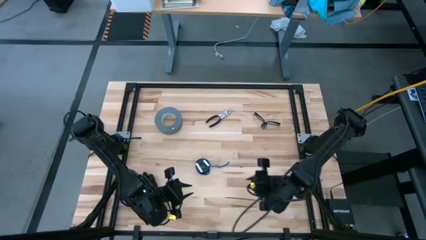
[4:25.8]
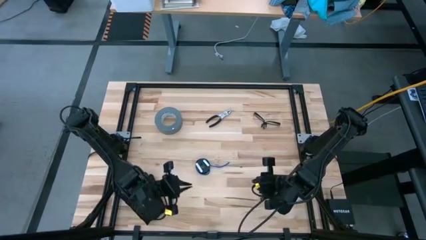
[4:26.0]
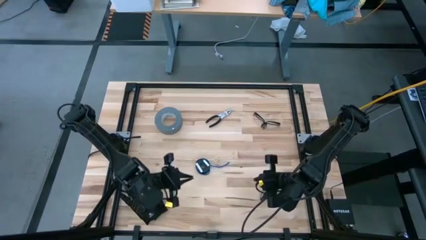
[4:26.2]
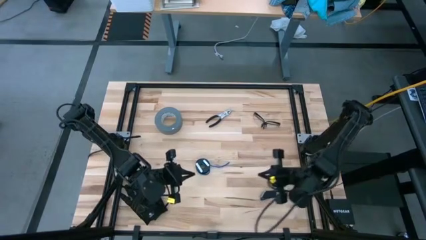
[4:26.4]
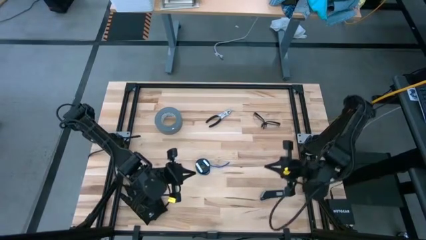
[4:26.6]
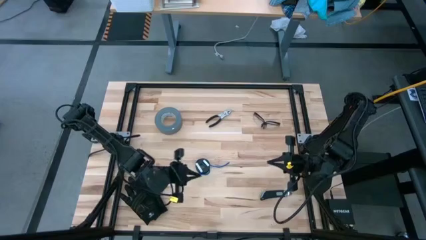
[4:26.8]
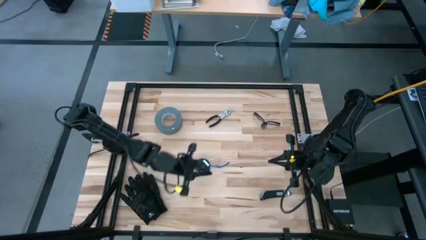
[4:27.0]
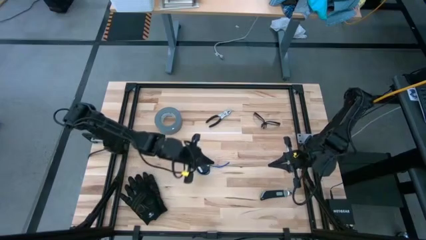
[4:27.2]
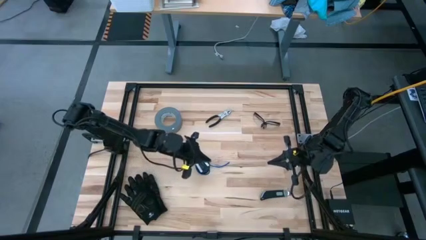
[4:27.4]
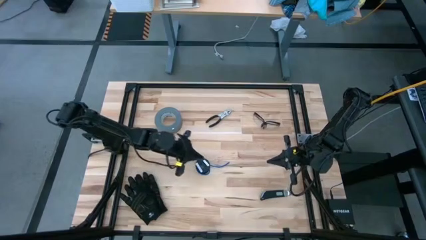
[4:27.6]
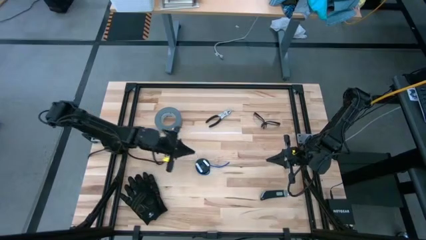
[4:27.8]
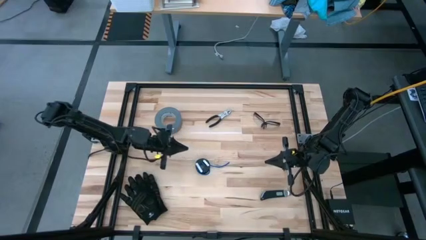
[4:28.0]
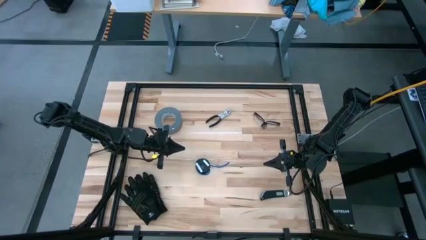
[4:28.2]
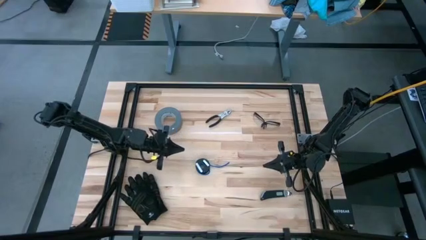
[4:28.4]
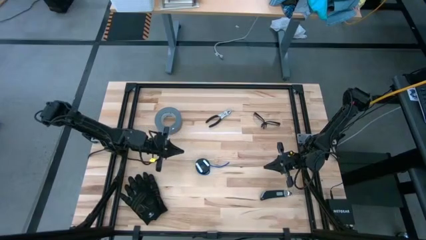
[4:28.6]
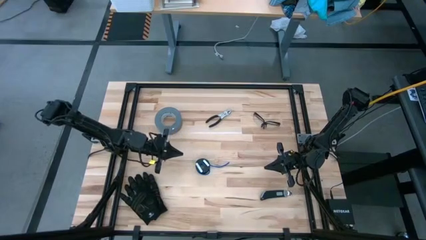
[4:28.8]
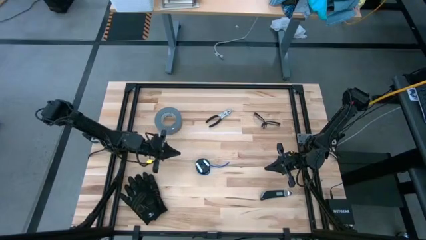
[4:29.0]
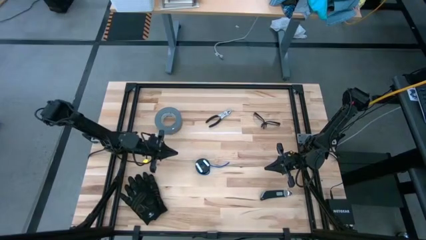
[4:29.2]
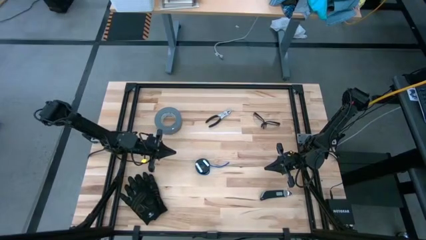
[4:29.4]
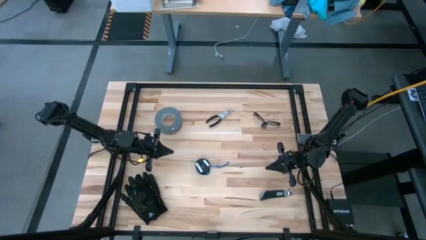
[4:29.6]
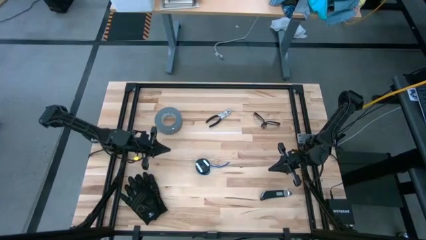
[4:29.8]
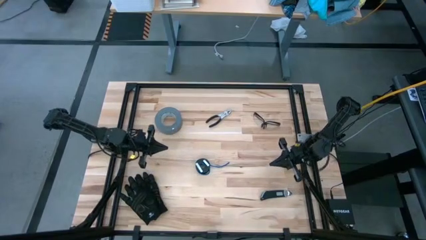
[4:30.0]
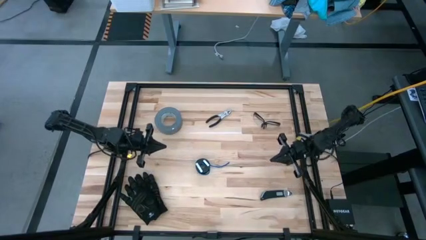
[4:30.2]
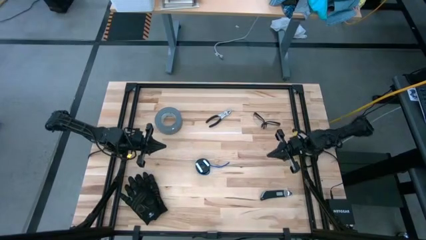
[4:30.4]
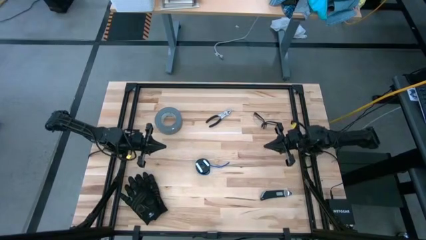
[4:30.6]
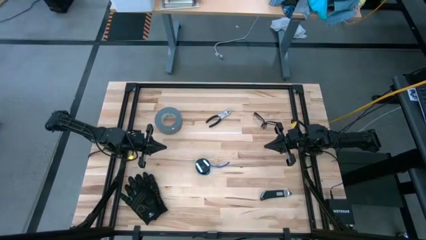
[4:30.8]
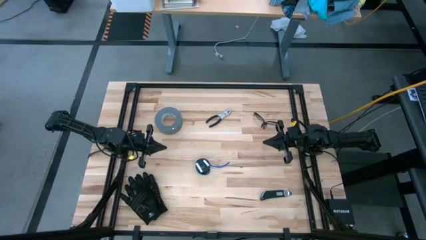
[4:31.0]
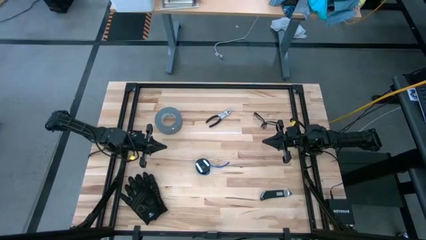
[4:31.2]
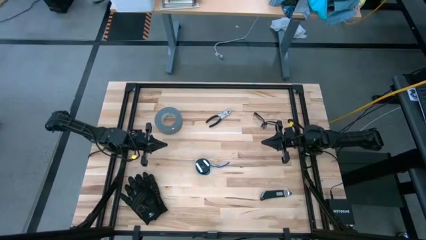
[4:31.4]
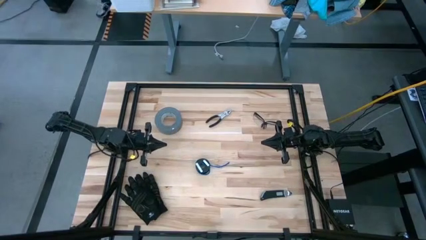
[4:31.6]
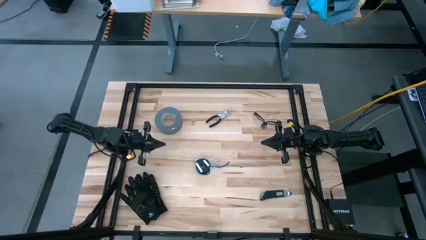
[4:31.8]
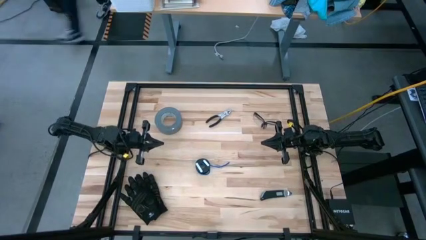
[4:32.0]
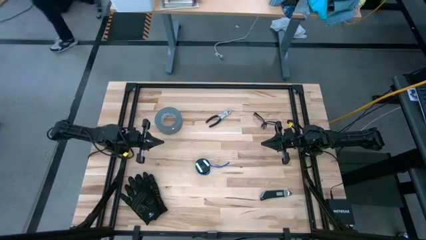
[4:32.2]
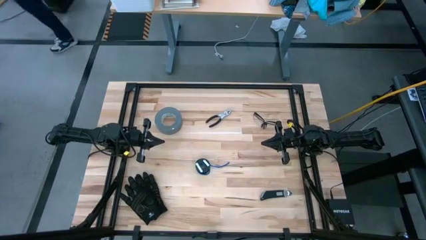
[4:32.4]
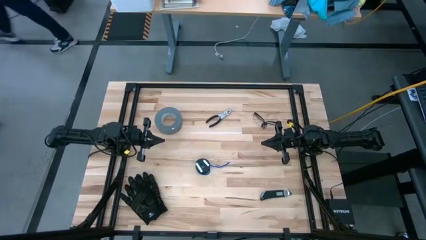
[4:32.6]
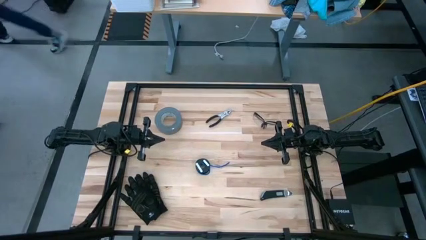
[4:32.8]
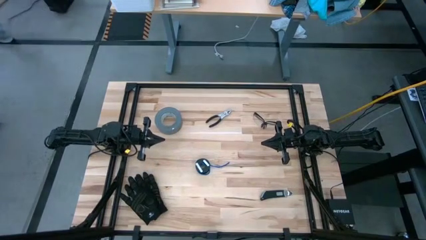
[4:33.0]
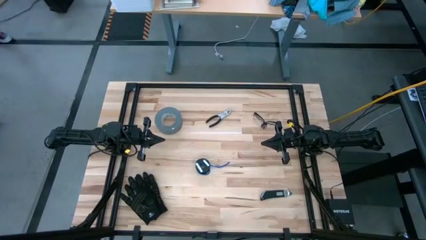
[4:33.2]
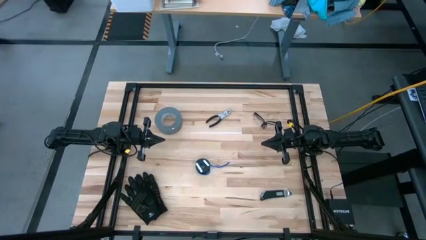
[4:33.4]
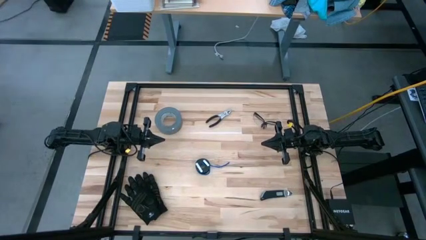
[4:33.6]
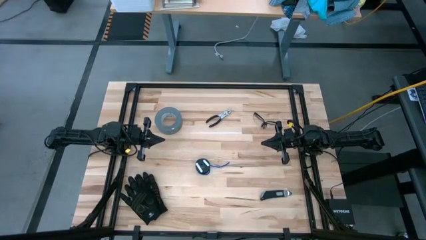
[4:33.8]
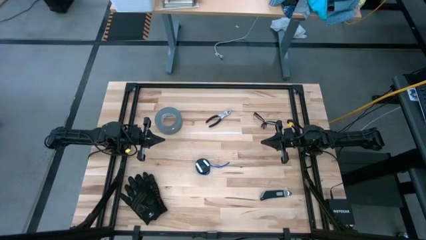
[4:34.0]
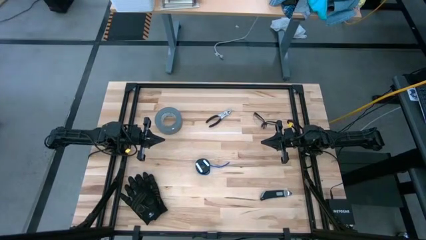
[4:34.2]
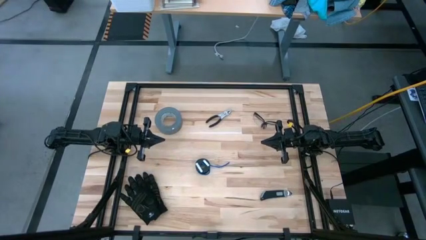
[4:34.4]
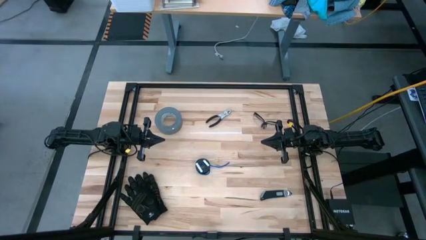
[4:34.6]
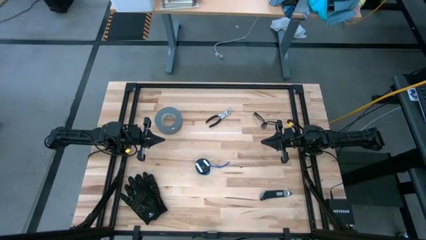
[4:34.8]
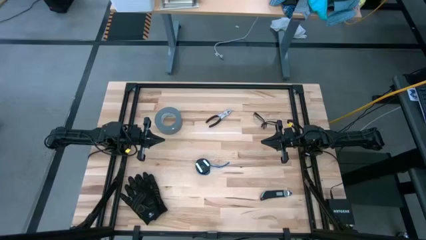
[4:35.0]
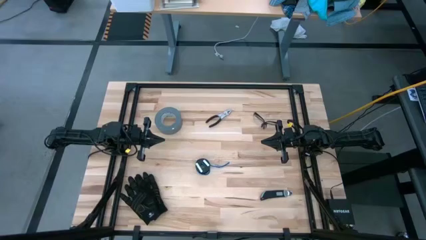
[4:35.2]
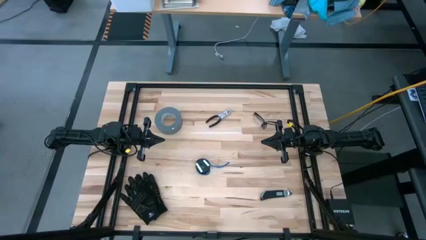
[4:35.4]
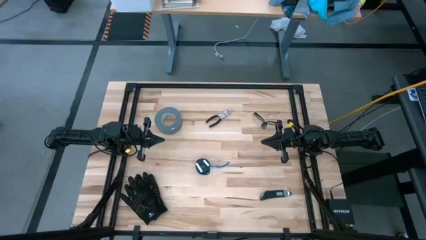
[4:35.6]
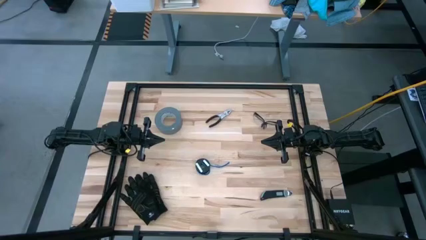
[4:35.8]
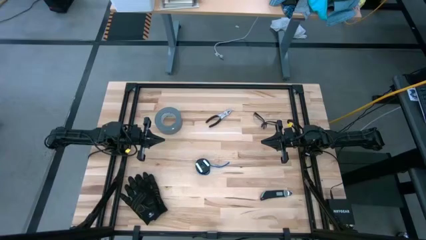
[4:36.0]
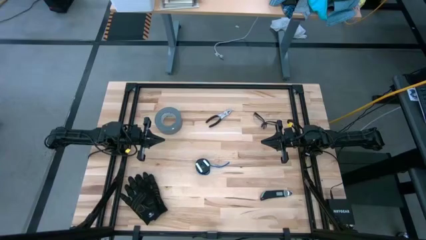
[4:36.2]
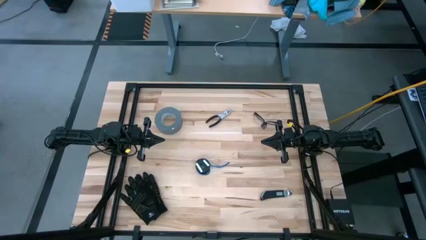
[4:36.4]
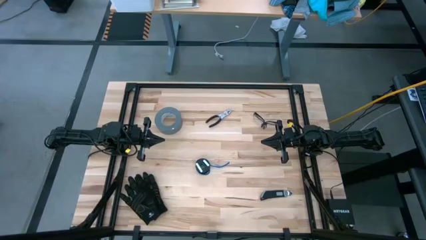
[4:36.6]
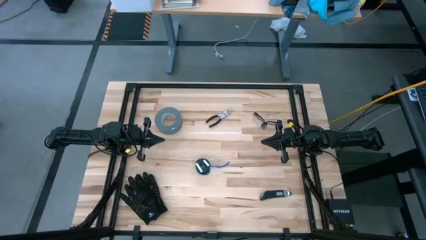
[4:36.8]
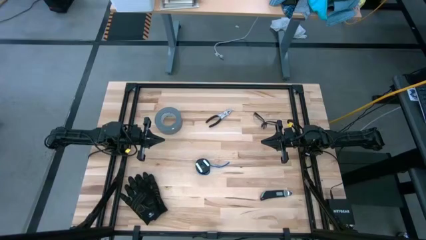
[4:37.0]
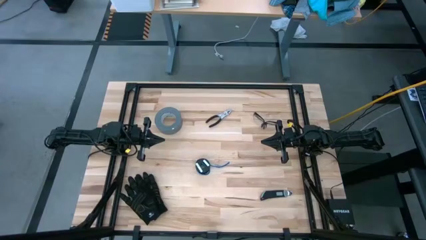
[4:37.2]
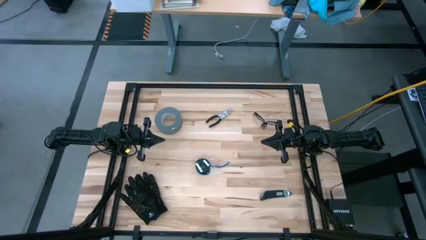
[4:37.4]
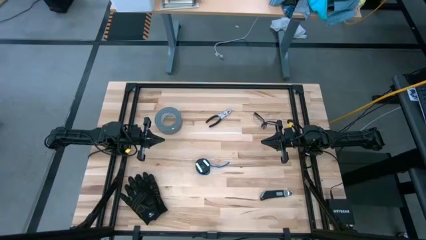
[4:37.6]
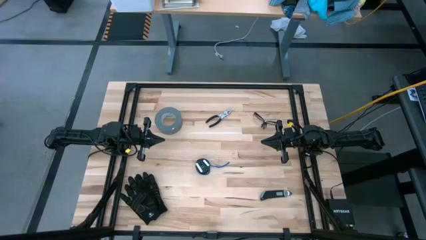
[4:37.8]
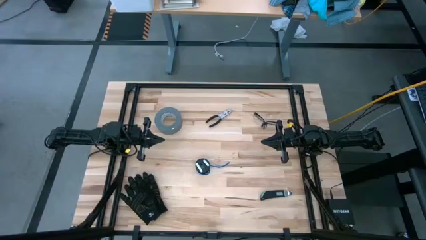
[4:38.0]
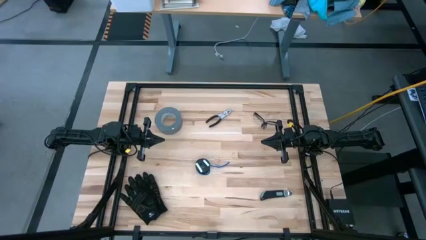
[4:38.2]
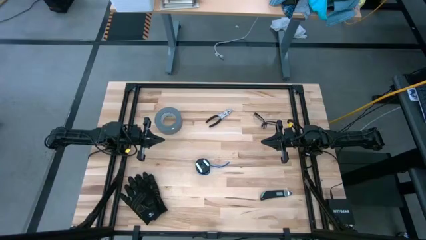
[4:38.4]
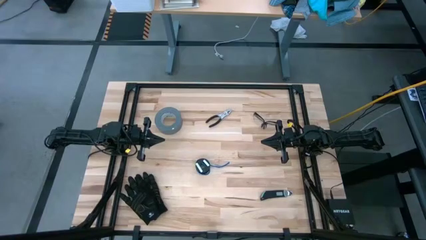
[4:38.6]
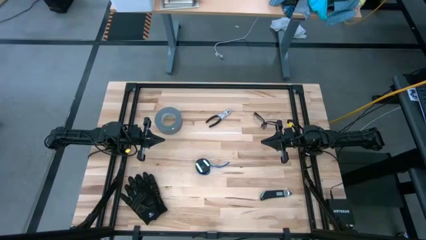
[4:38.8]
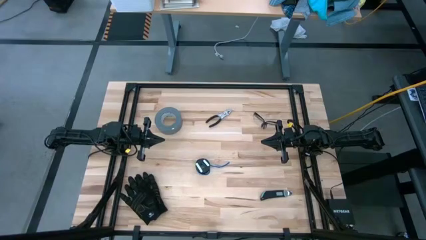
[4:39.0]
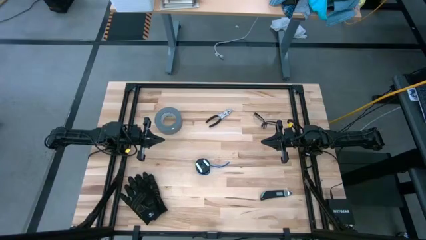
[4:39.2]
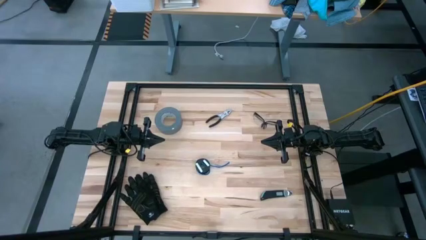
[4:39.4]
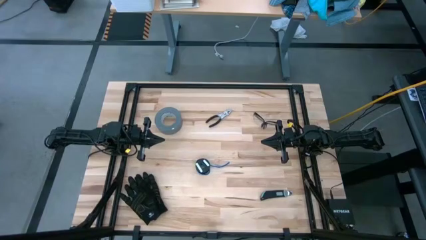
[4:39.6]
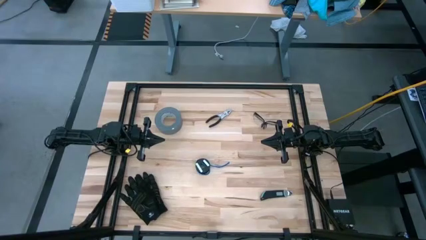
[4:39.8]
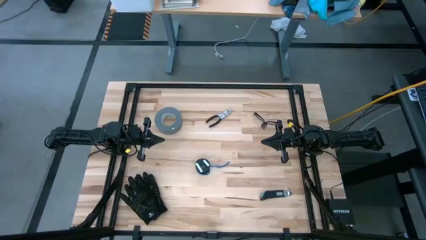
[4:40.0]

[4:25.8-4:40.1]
Task: Coil cords
Return to Home Position
